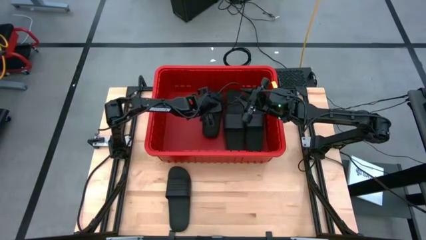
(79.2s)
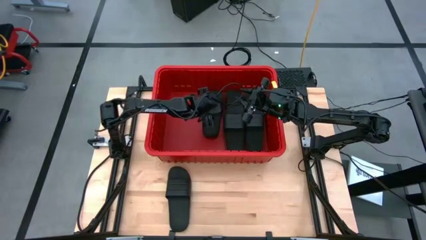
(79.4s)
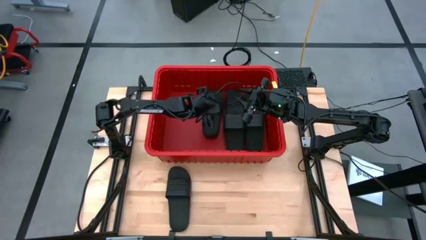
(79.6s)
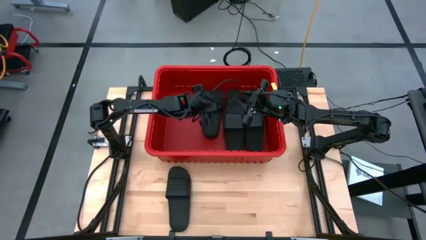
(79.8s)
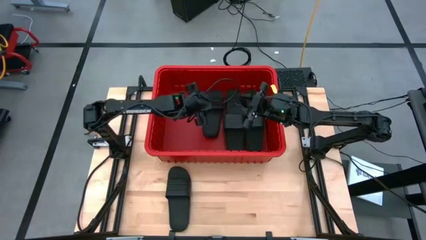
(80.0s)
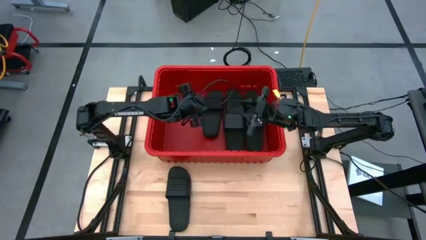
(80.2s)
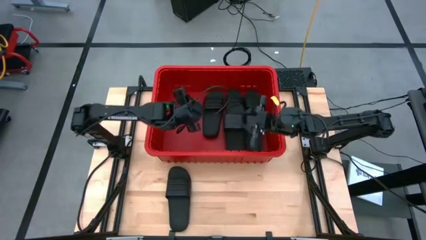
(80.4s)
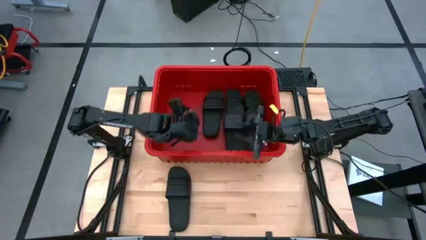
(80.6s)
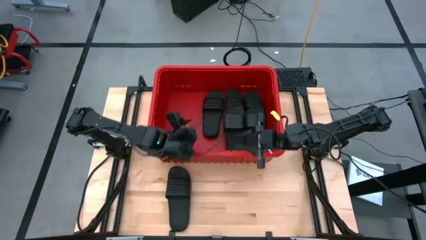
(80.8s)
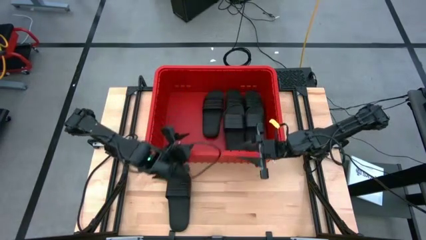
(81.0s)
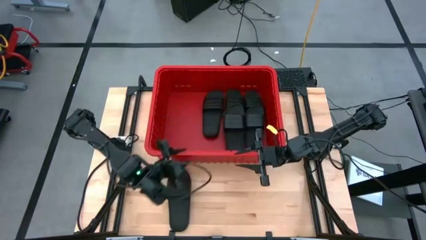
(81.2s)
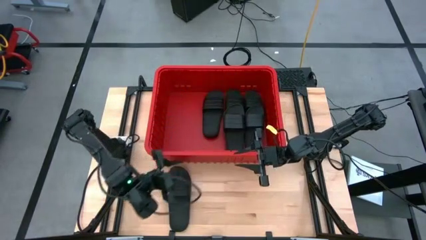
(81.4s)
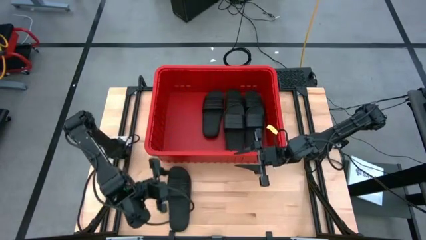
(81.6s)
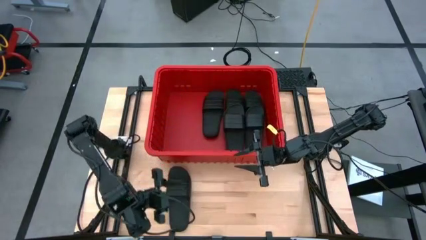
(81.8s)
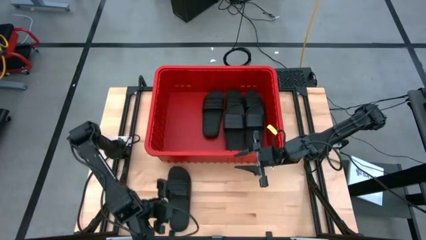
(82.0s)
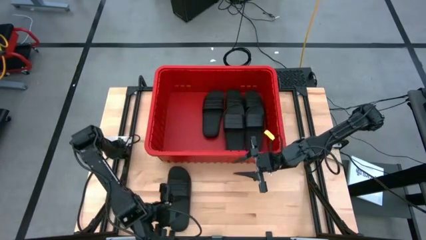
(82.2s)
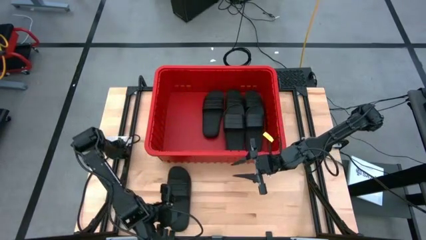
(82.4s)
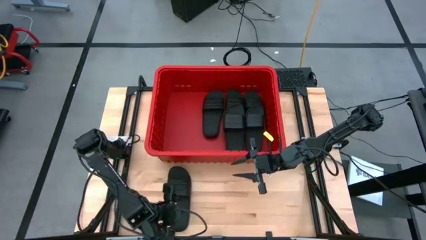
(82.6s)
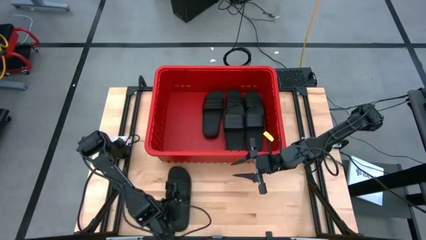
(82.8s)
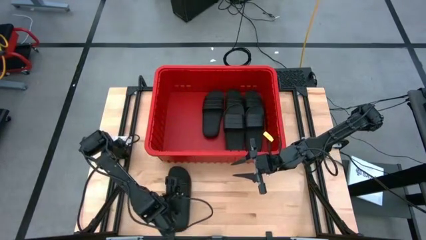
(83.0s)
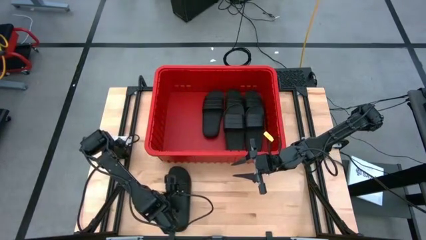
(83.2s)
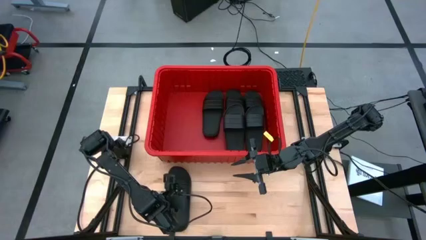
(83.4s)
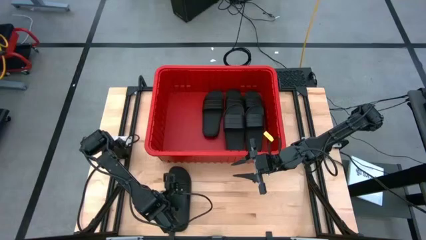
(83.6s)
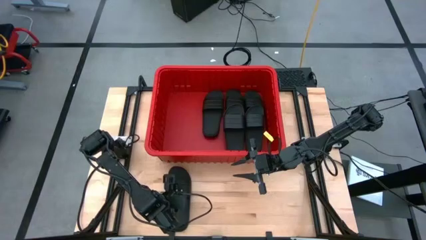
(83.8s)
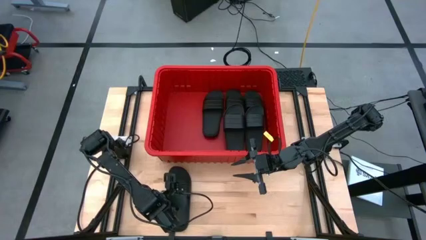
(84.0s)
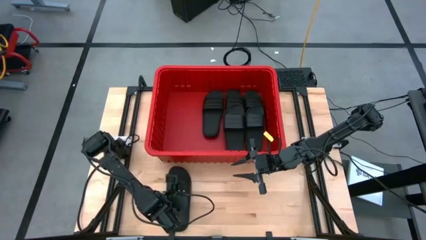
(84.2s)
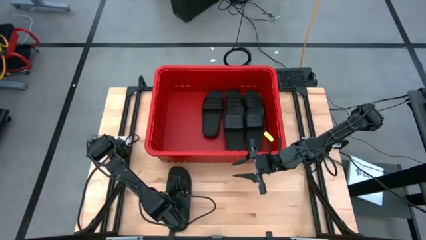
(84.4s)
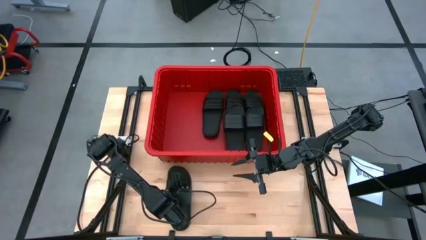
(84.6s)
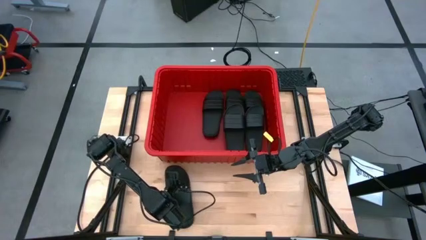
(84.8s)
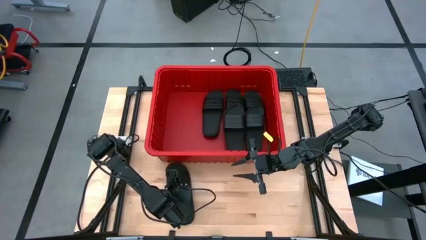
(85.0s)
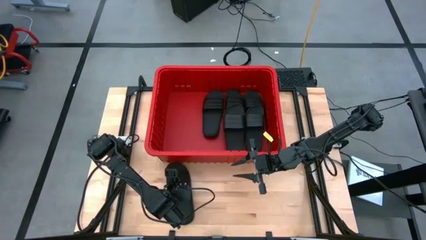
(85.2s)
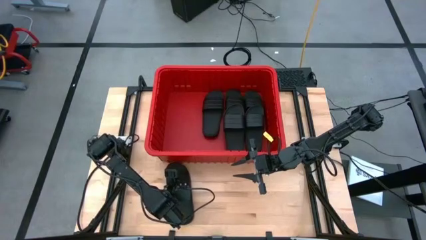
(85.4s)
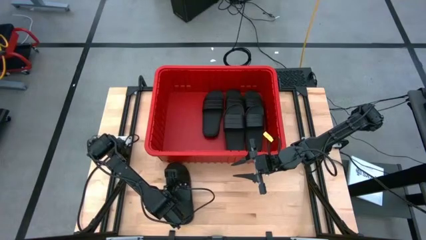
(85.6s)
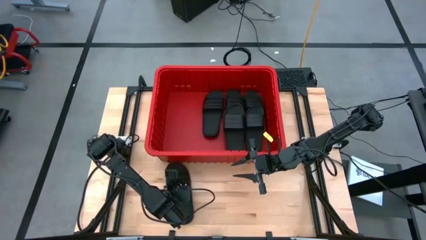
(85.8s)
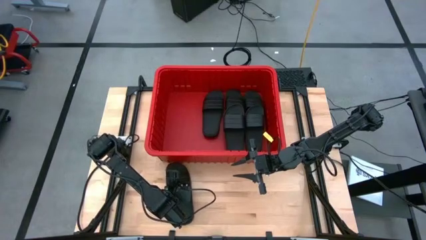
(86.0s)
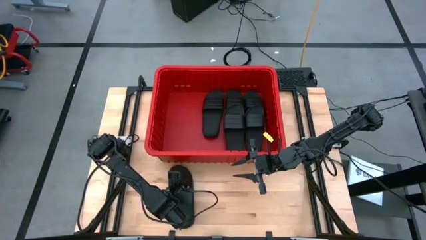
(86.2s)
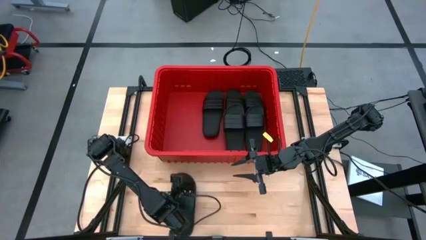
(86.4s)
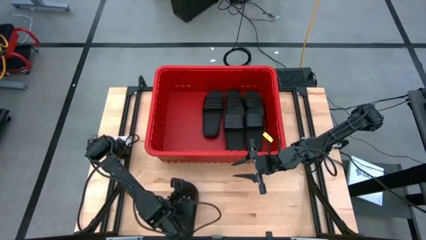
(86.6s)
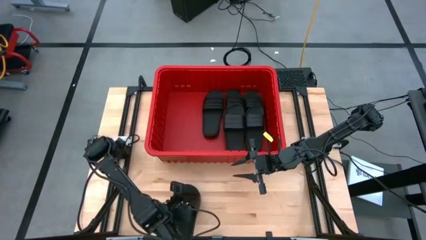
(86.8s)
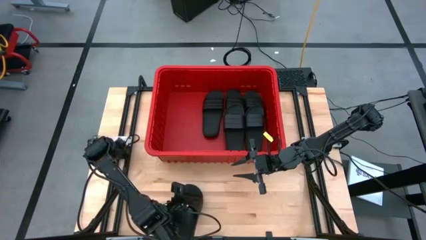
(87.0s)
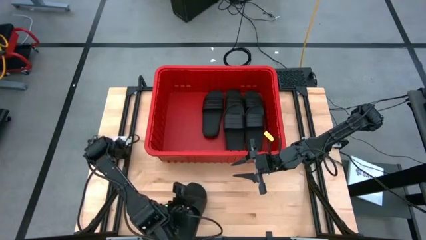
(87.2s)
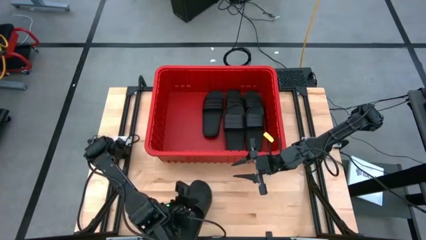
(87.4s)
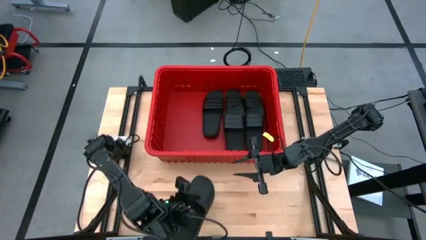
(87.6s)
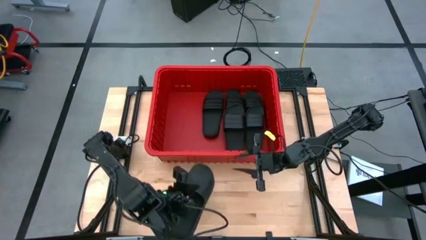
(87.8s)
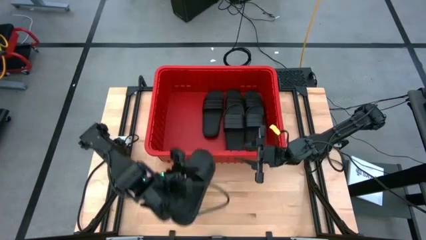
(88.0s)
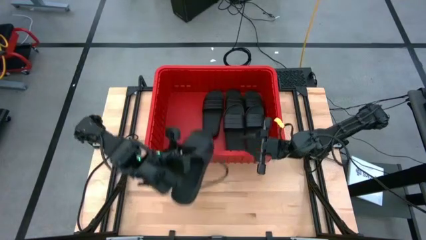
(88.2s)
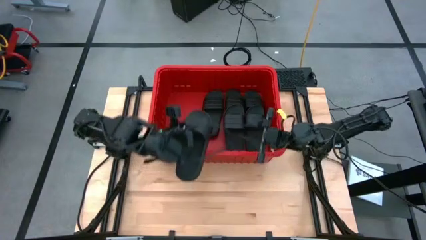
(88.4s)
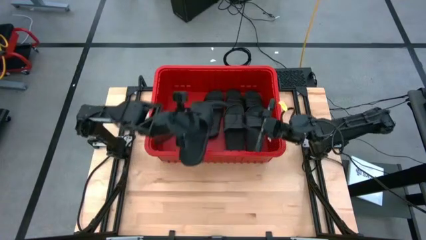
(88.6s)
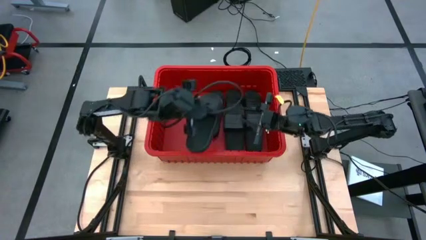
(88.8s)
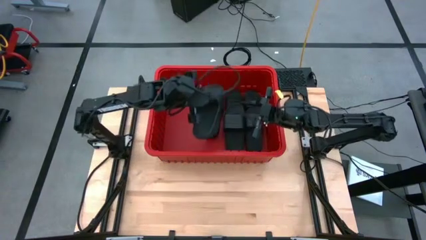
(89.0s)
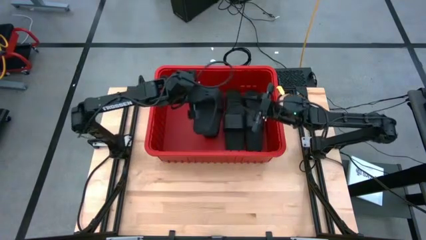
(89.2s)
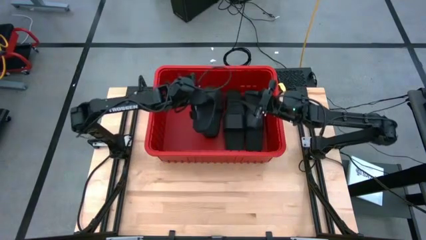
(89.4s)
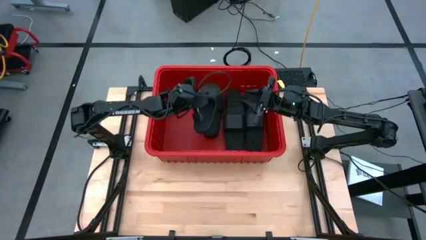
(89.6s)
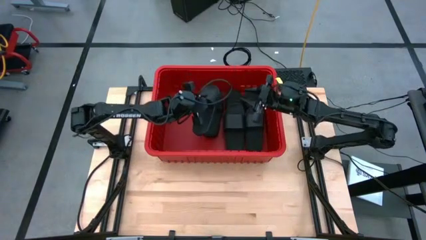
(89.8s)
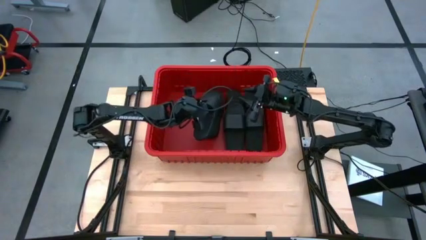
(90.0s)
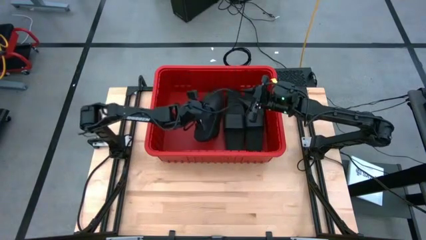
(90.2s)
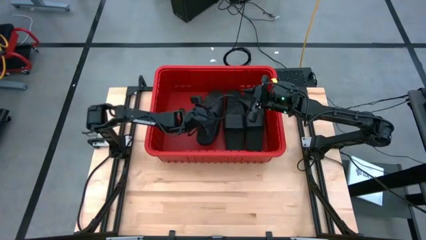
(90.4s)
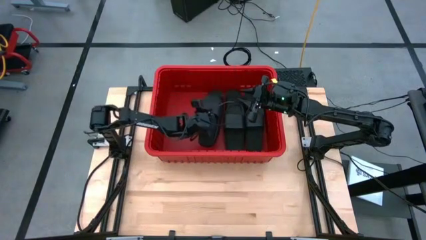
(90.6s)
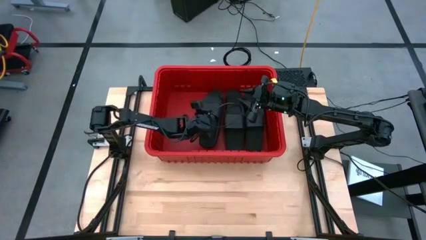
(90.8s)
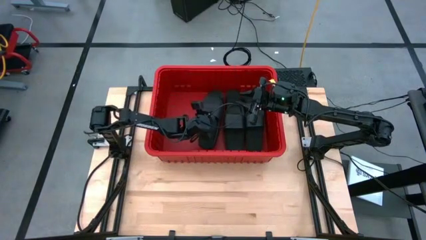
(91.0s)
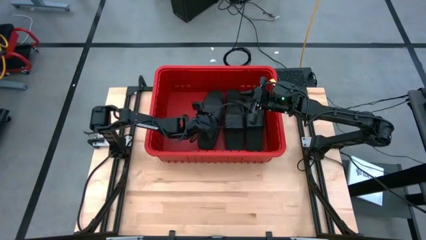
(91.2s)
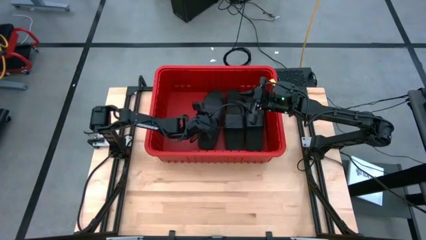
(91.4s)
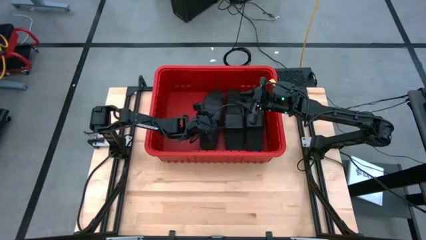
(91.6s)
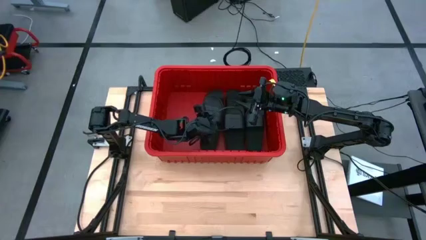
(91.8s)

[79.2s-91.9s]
Task: Pick and place slides into bin
Put the black slide into the red bin

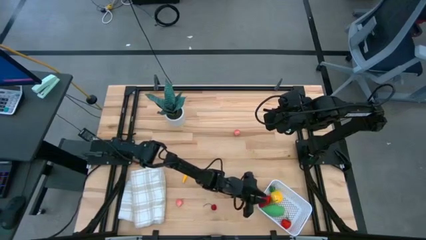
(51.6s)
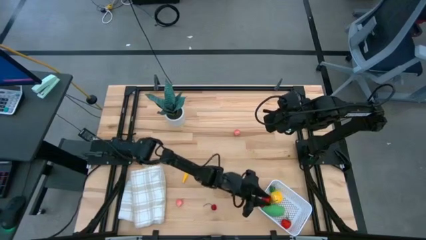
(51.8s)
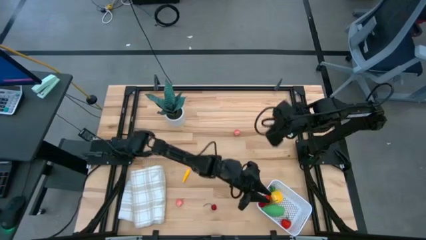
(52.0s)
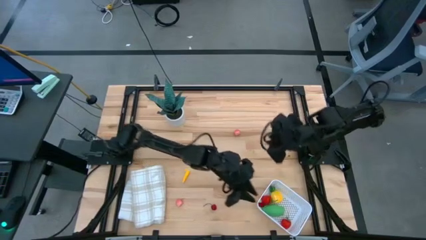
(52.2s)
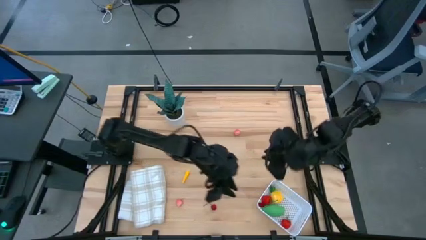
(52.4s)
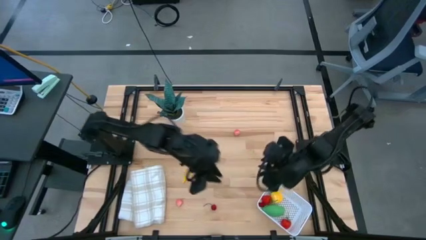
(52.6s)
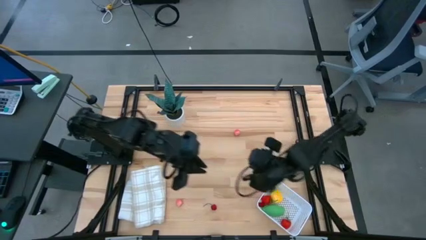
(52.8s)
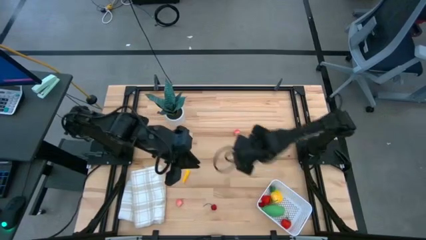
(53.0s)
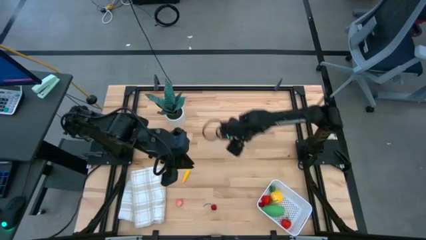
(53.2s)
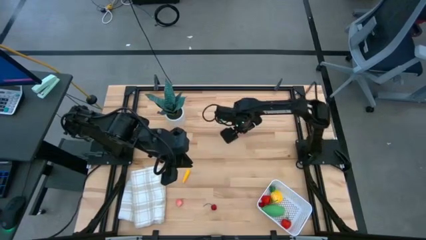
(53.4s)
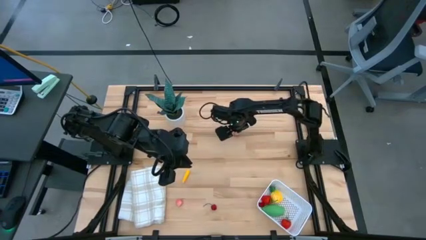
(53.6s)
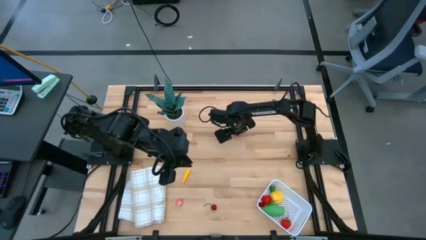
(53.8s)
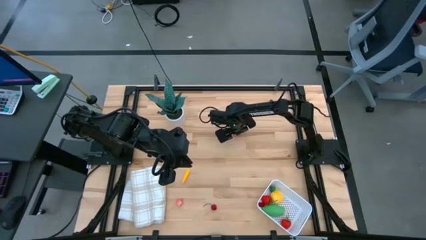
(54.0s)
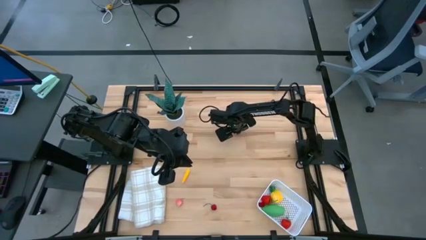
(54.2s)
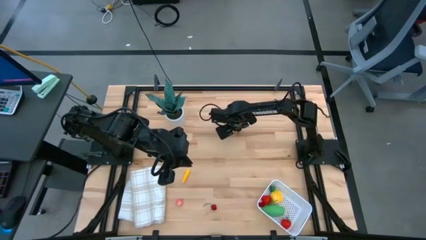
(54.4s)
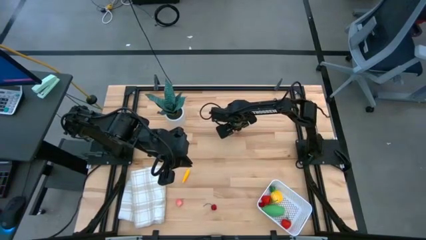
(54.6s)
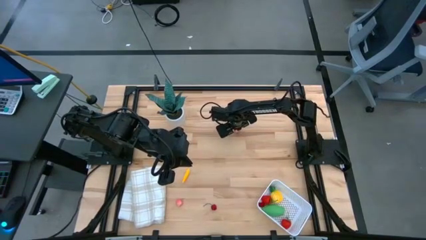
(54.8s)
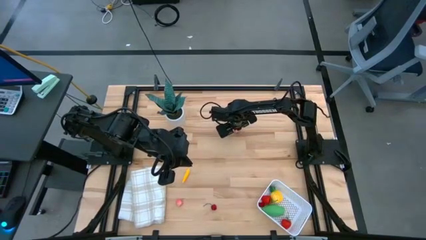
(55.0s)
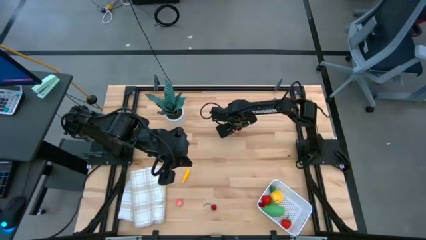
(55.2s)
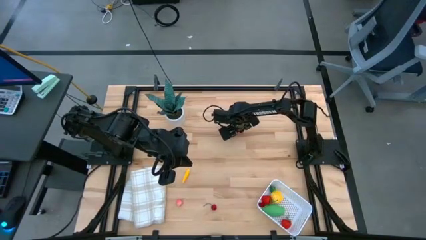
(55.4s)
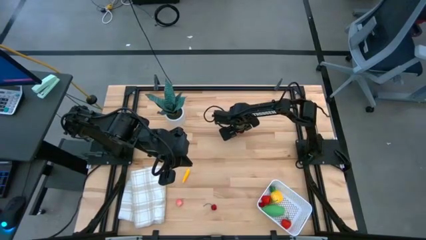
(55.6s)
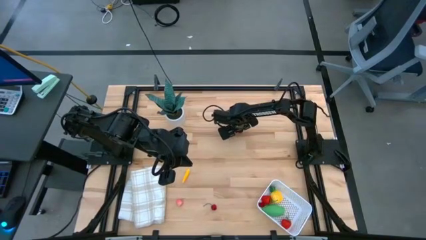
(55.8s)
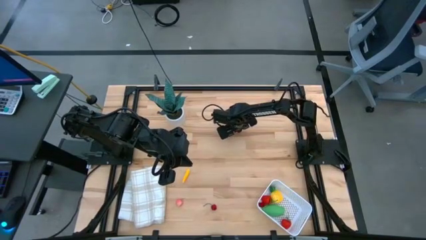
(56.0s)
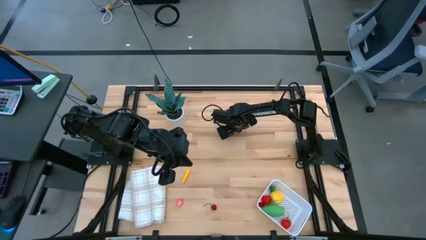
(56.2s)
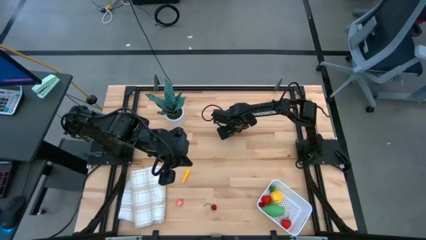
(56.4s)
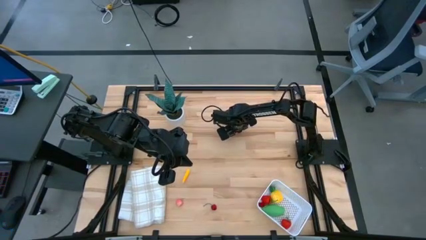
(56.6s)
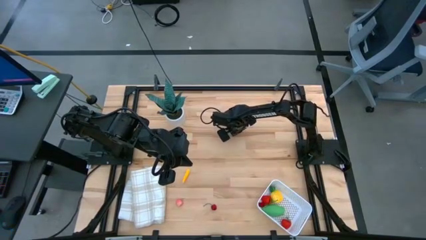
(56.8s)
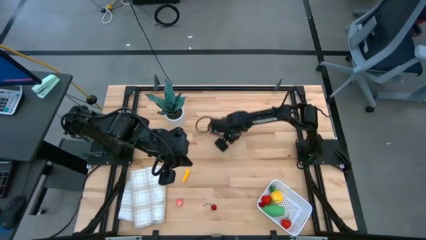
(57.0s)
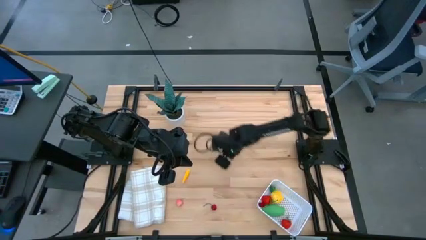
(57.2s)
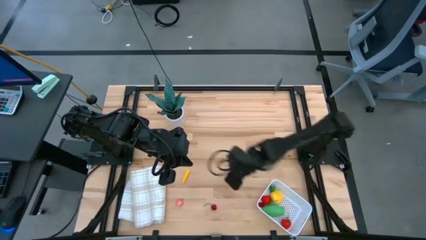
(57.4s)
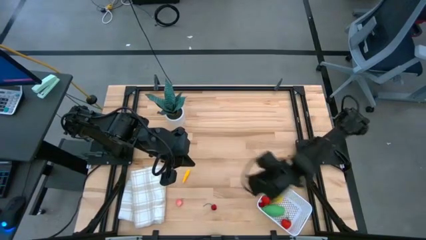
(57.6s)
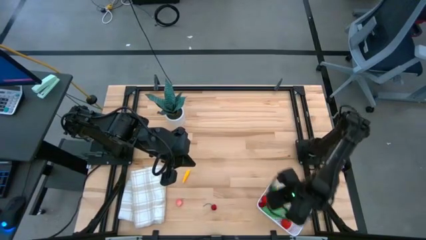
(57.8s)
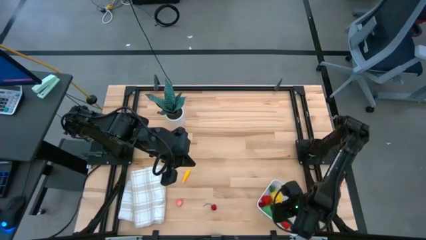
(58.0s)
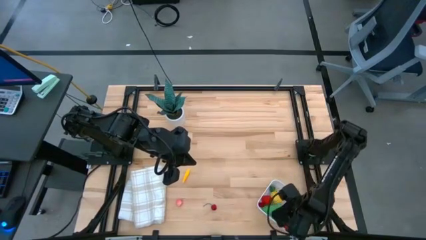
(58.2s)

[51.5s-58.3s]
Task: Pick and placing Produce into tupperware
Put the top pink peach into the white bin
